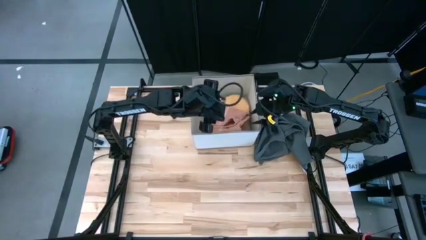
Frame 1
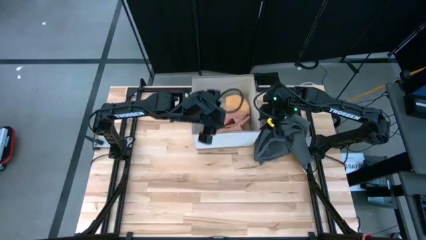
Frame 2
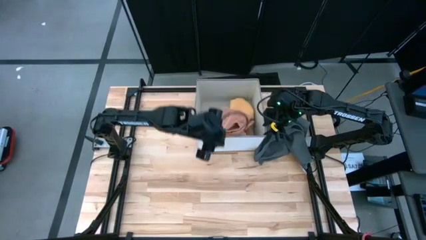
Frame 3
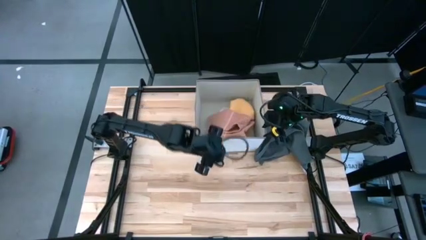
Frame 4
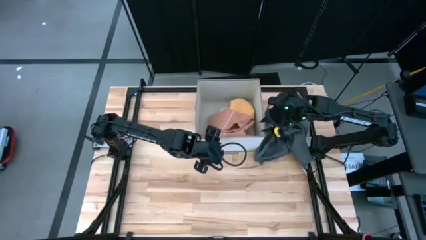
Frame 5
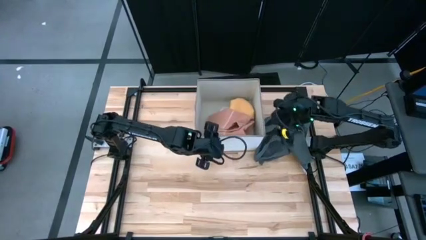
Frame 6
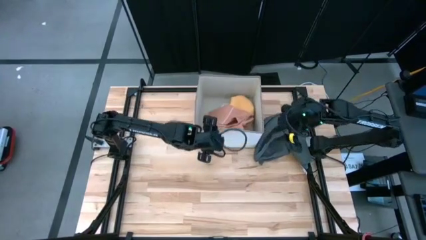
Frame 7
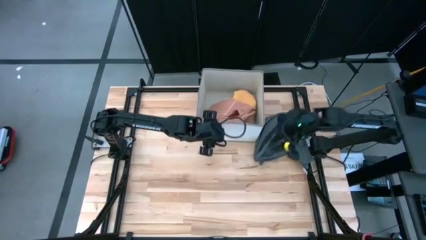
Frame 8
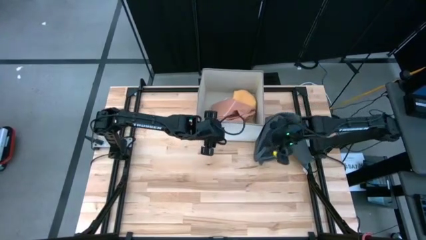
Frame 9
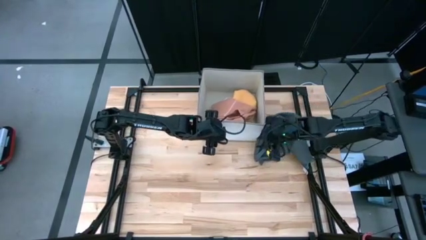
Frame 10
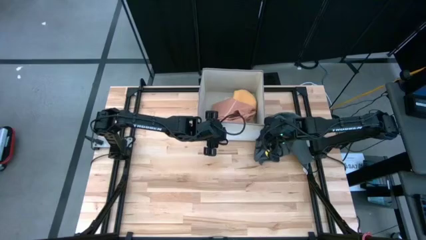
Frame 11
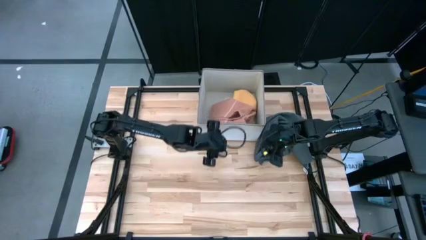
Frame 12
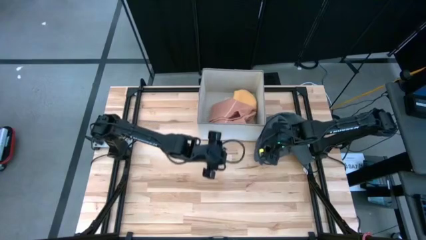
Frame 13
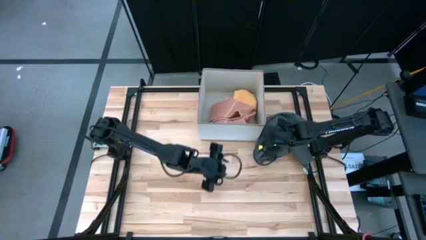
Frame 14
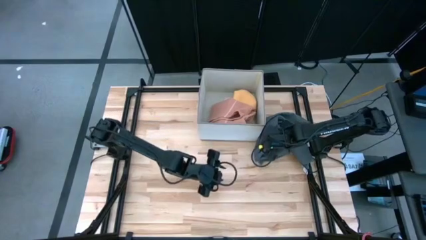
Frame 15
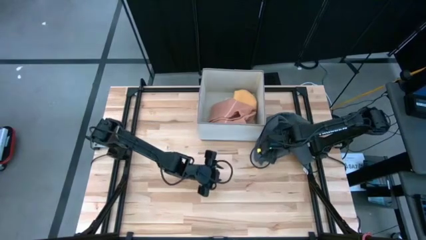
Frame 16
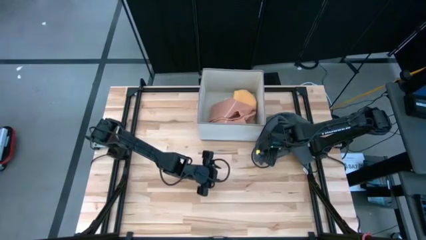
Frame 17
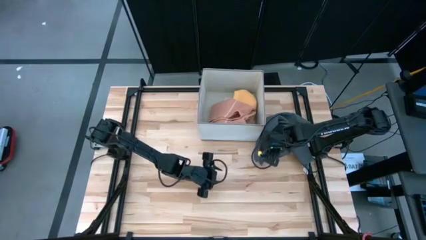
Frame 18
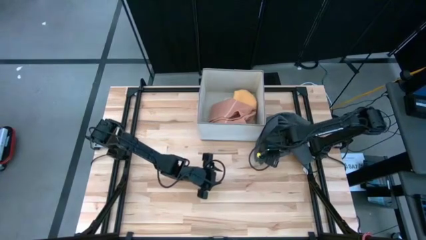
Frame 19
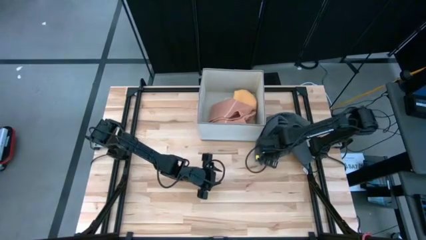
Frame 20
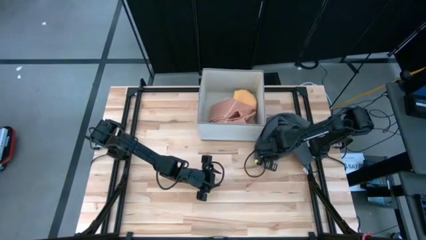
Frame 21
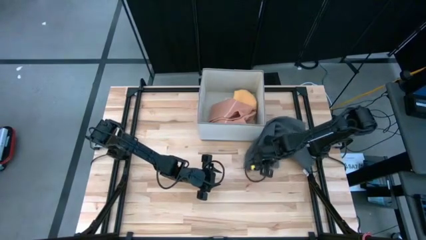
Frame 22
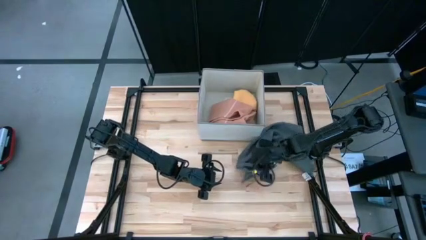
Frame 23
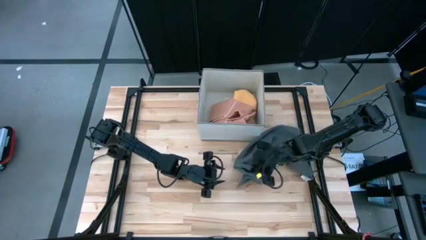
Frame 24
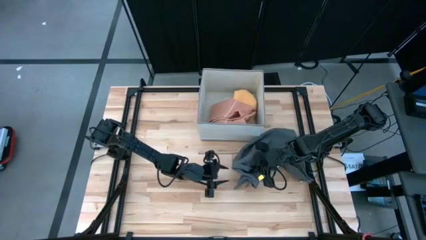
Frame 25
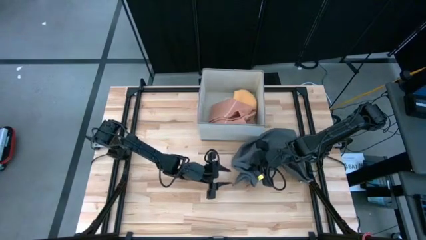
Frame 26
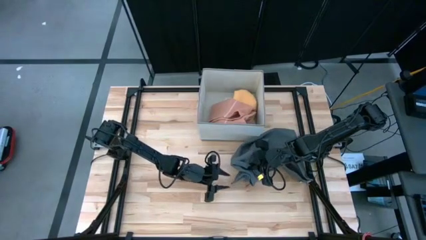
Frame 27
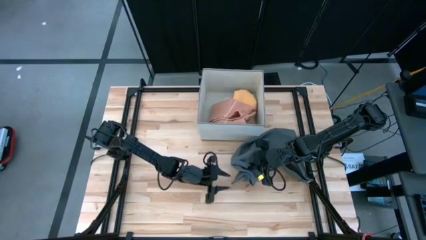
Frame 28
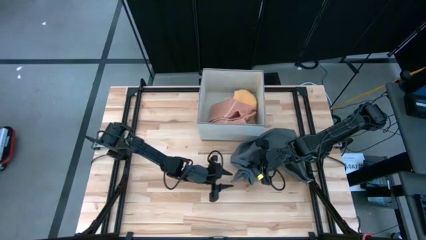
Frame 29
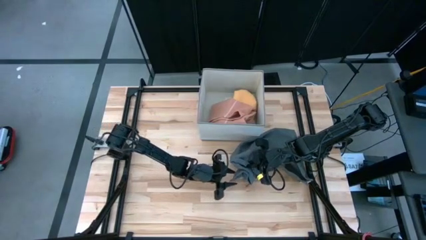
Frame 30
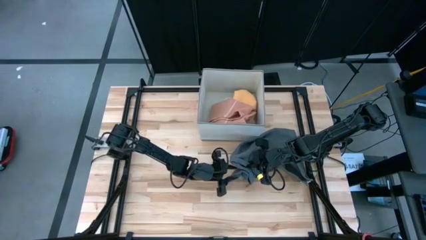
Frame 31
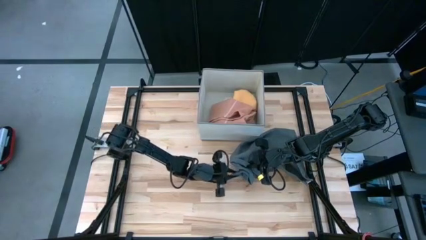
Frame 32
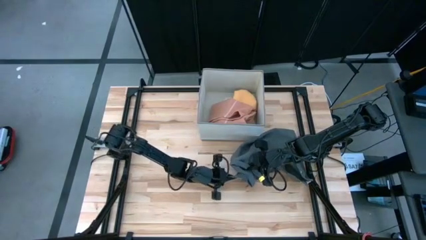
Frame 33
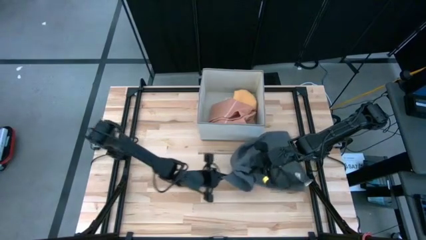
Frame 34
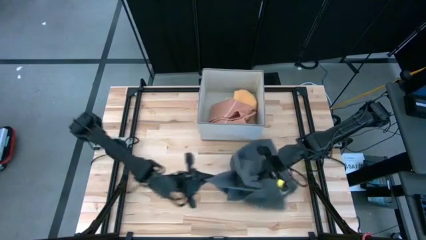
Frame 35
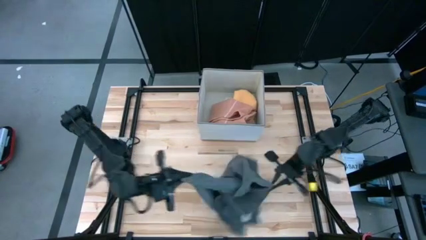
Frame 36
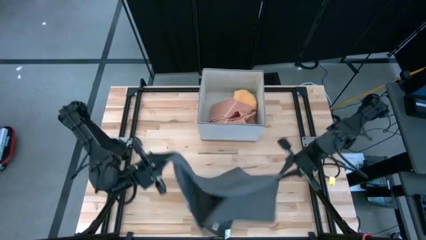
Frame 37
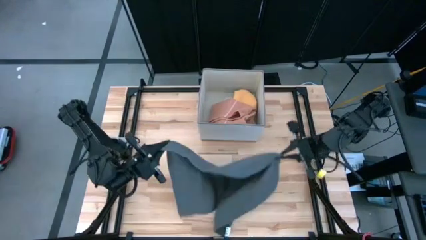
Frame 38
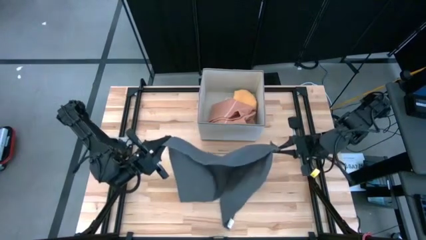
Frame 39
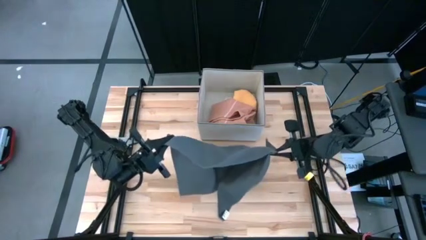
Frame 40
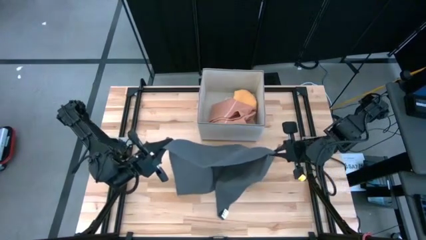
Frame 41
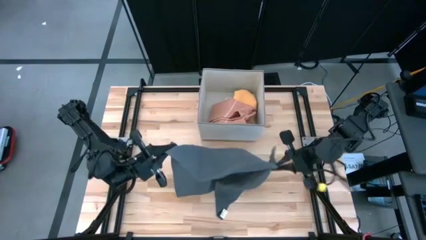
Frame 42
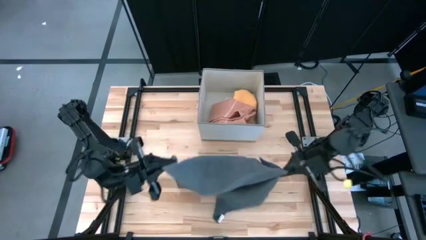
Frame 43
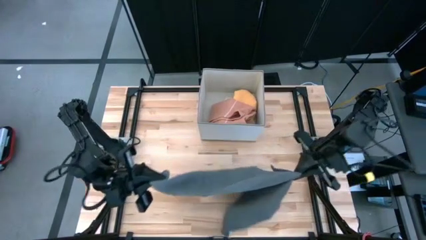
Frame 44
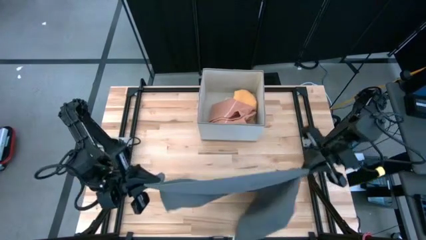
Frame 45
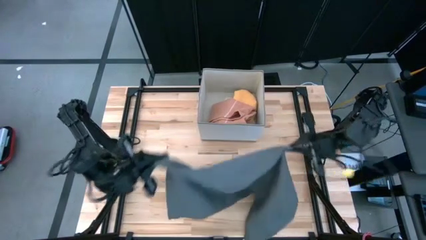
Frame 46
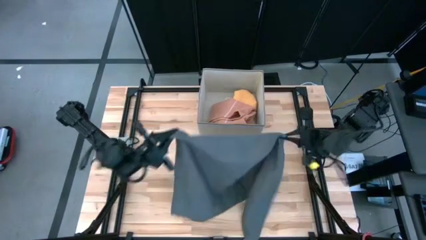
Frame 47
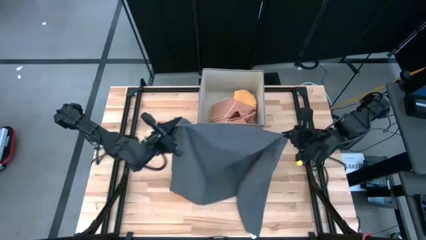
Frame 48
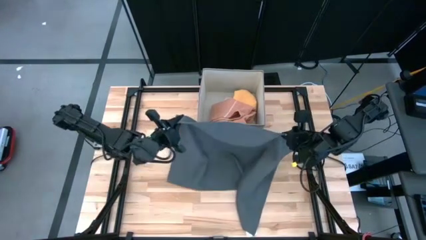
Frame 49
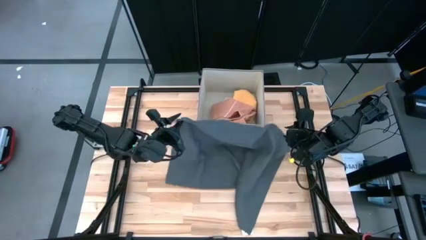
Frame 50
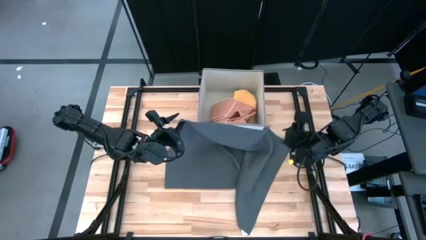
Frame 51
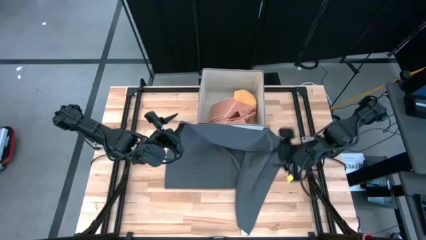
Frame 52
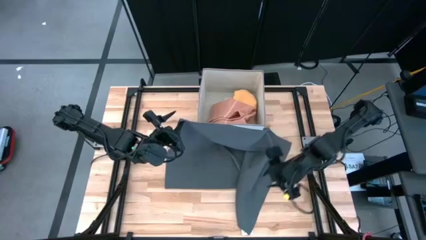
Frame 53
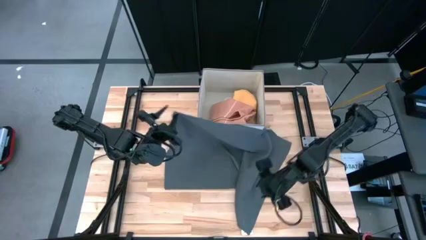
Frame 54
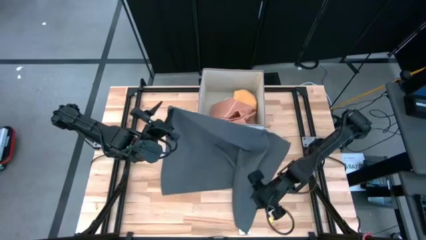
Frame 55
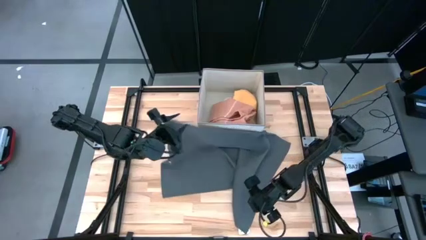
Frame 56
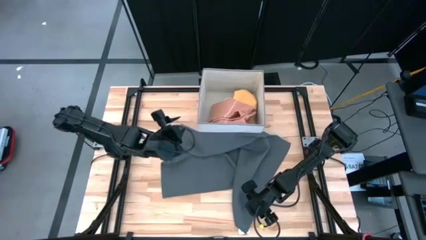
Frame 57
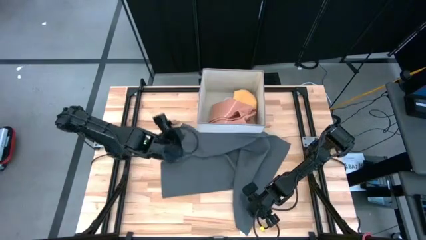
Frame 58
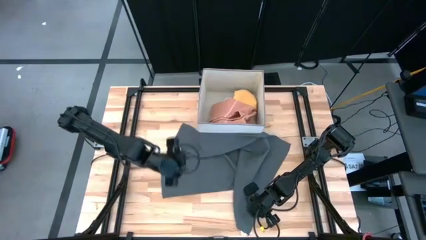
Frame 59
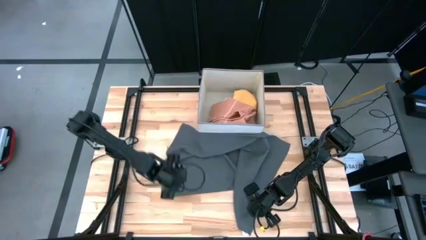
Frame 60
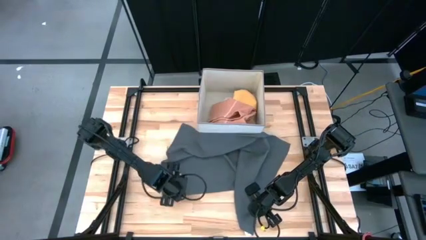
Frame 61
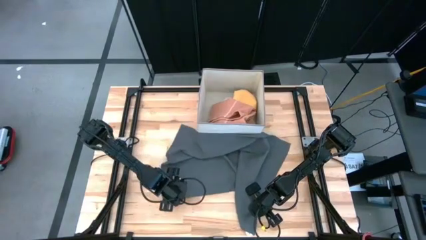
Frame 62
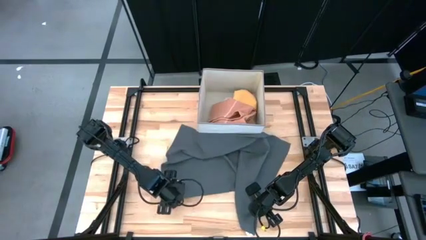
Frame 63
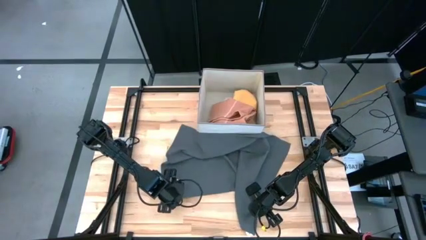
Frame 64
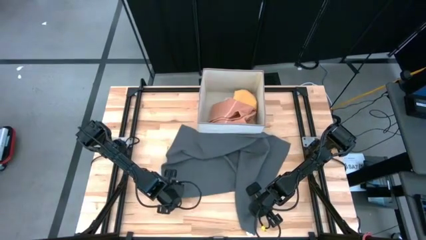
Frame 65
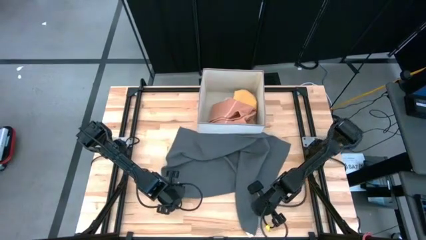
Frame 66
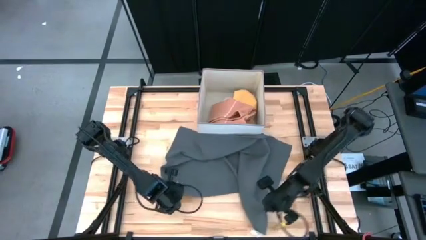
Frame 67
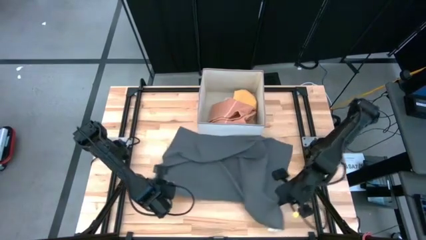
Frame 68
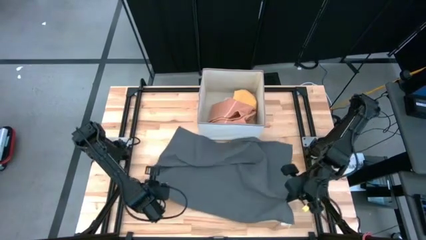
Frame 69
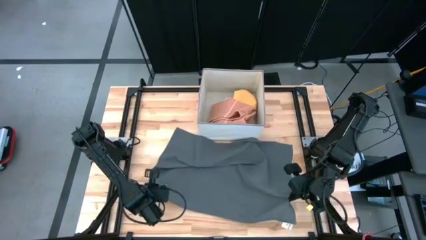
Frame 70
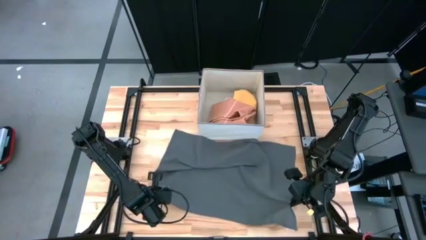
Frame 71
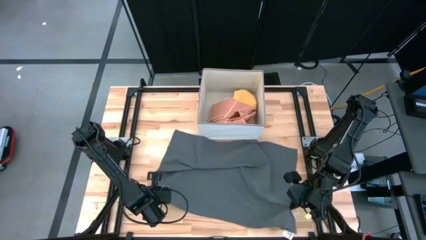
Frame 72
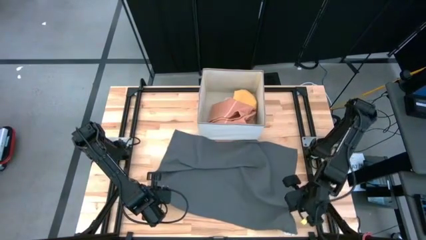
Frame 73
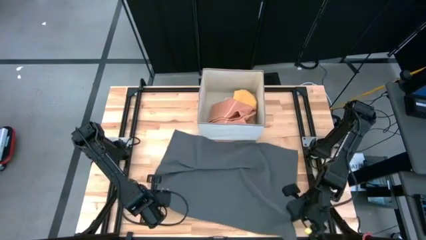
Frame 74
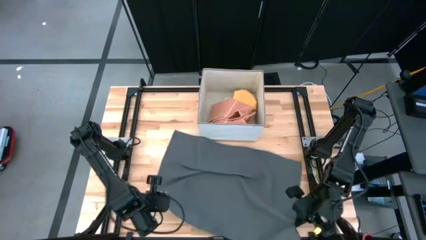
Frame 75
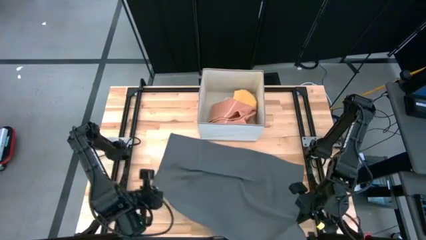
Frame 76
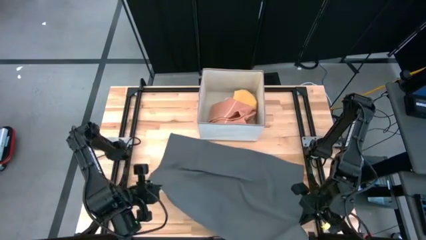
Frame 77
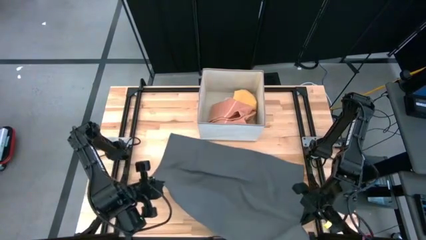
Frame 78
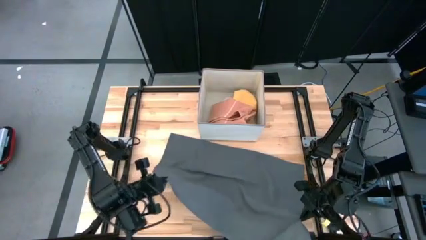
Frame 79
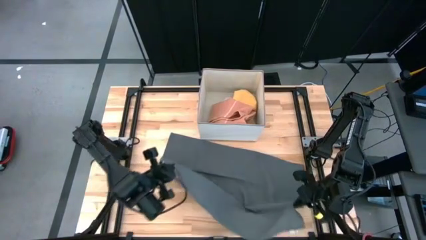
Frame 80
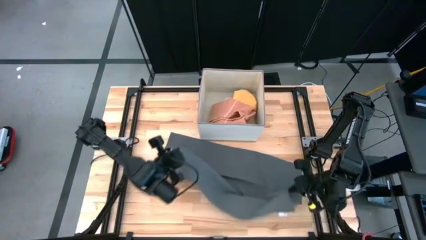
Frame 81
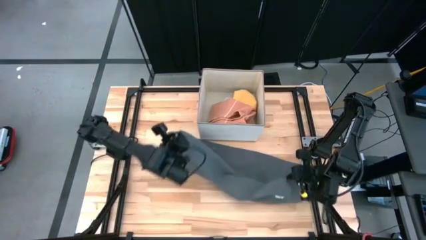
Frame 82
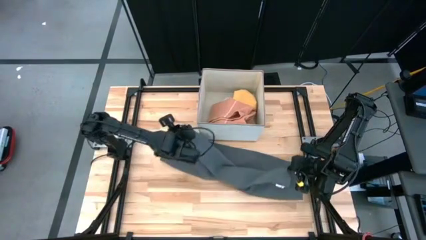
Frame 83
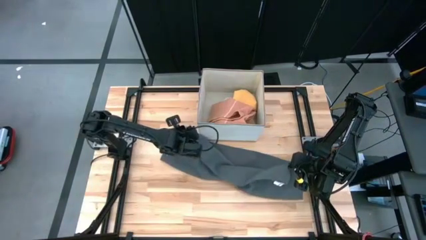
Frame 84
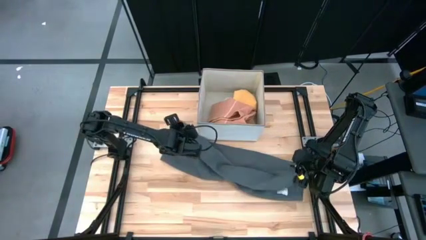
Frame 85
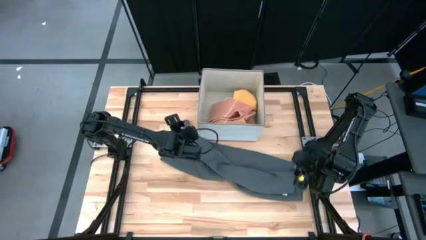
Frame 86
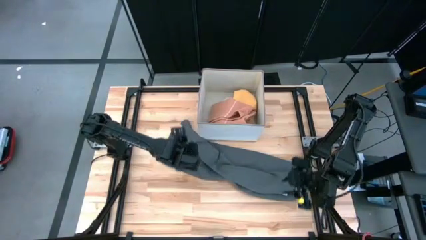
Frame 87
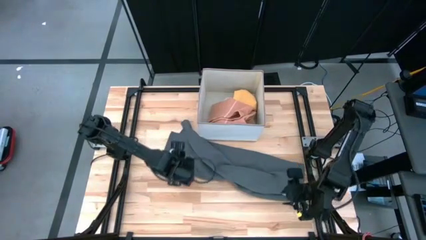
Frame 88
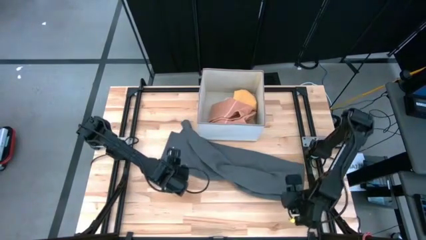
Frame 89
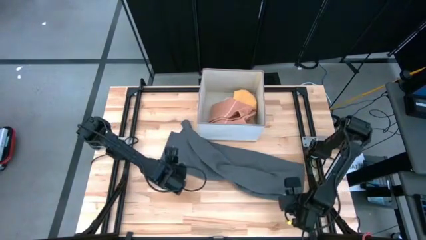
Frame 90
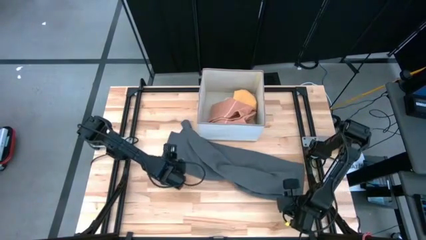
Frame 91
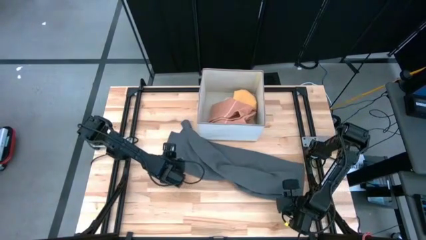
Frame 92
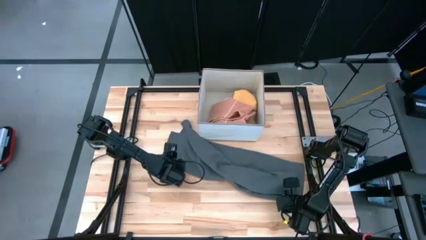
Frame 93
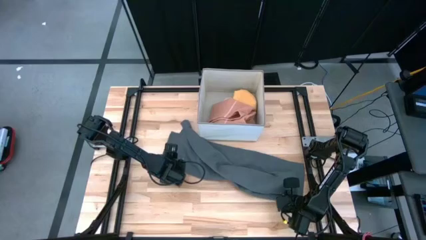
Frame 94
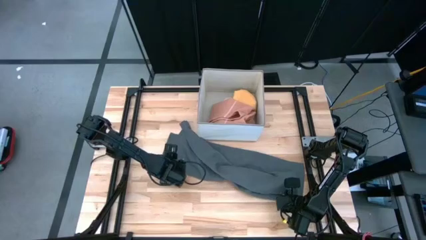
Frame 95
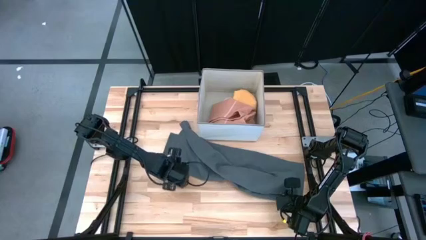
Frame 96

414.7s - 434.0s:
Task: Fold towel
Fold the dark gray towel
